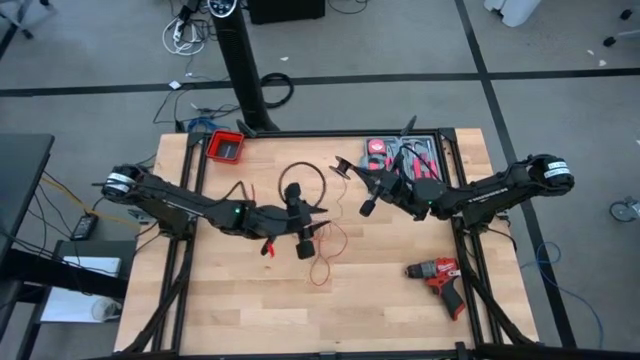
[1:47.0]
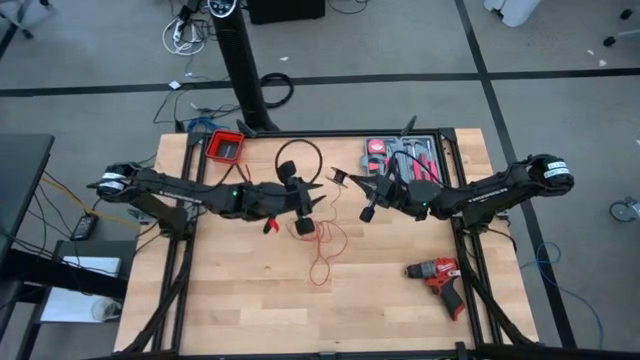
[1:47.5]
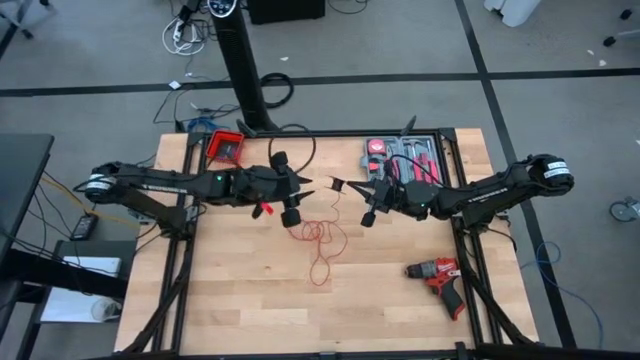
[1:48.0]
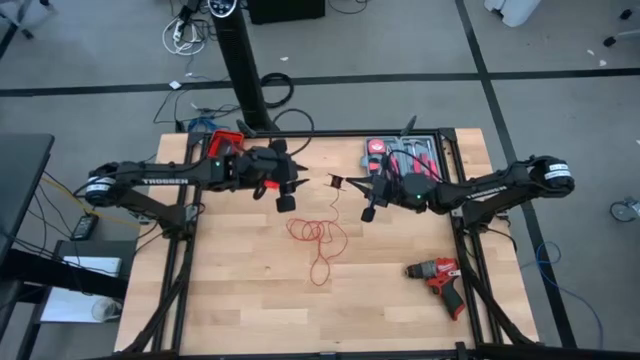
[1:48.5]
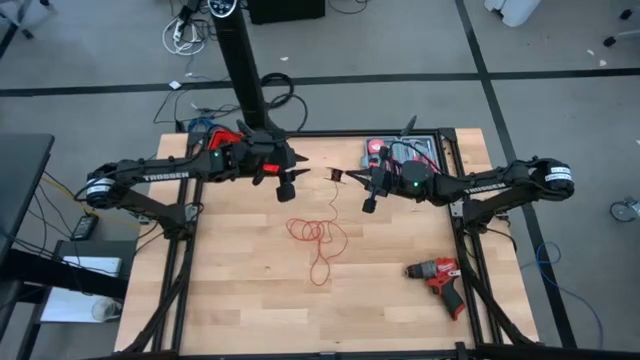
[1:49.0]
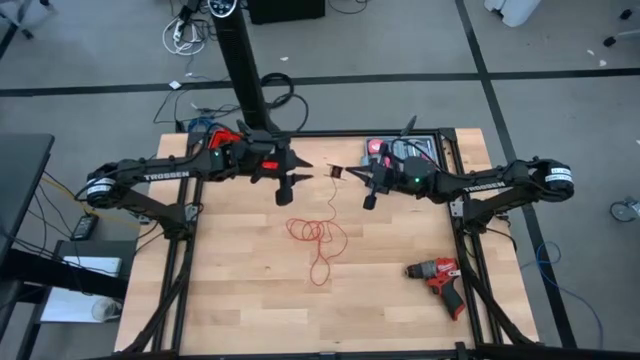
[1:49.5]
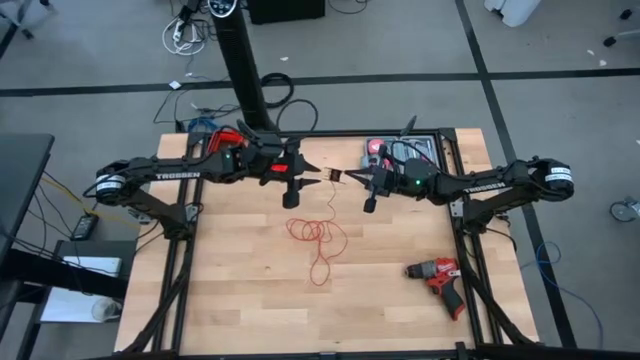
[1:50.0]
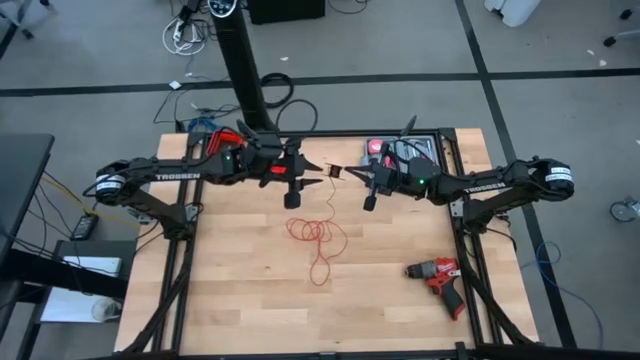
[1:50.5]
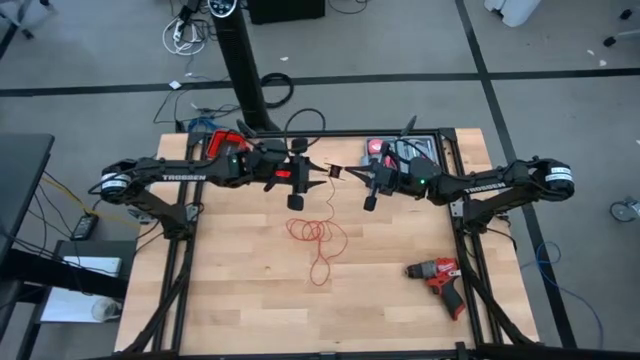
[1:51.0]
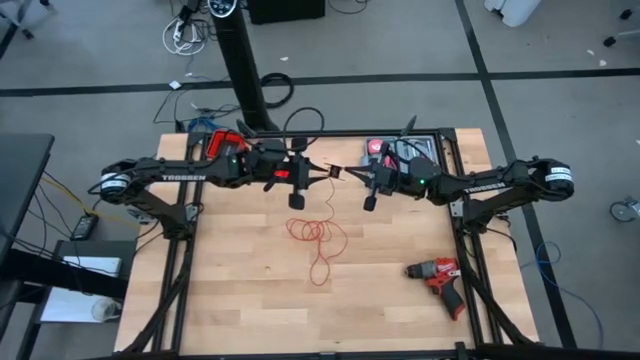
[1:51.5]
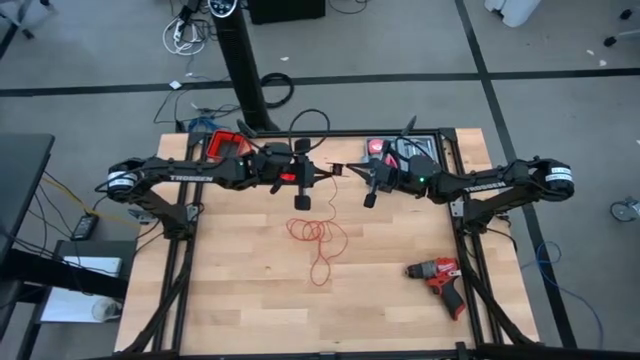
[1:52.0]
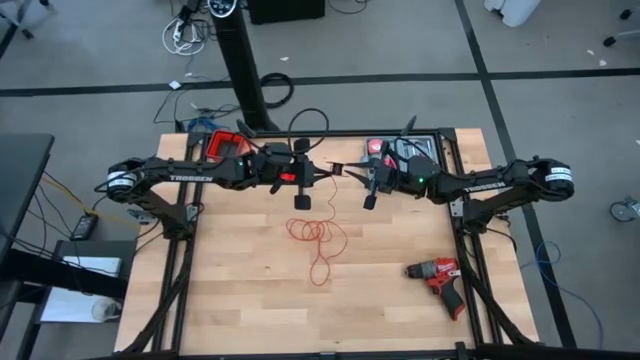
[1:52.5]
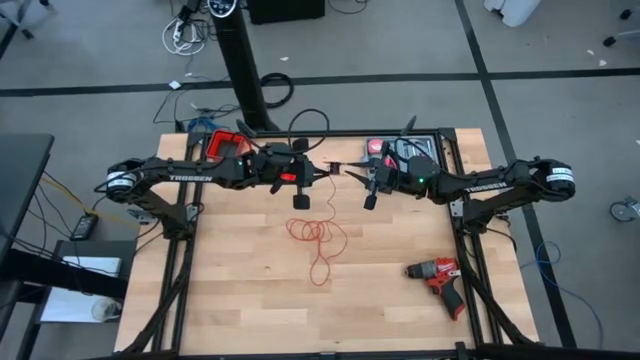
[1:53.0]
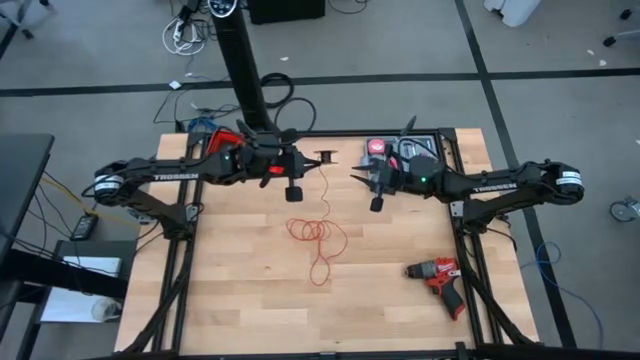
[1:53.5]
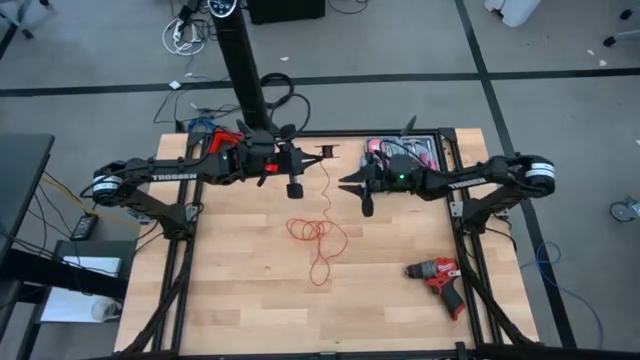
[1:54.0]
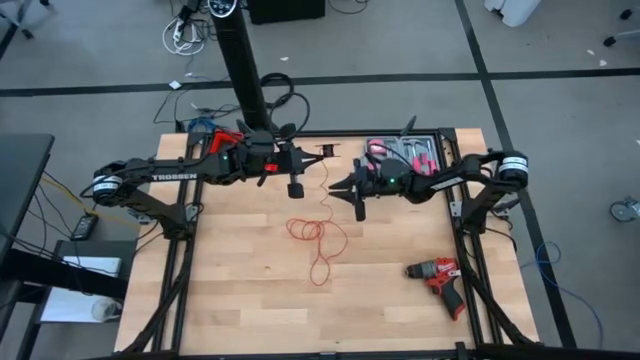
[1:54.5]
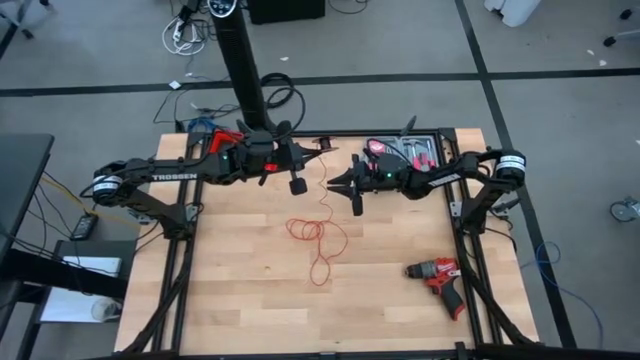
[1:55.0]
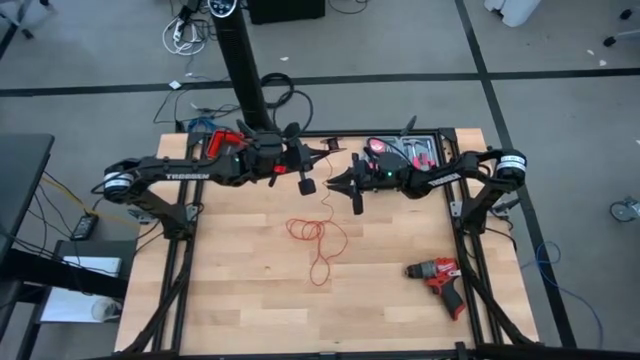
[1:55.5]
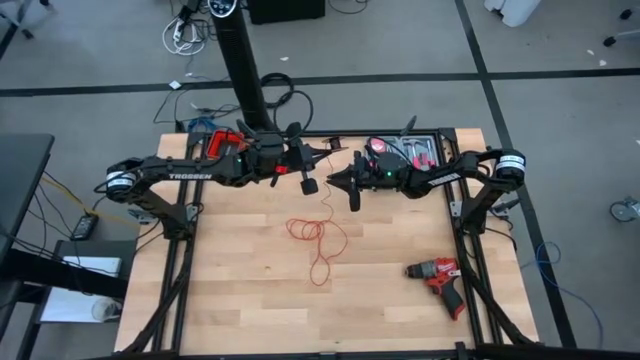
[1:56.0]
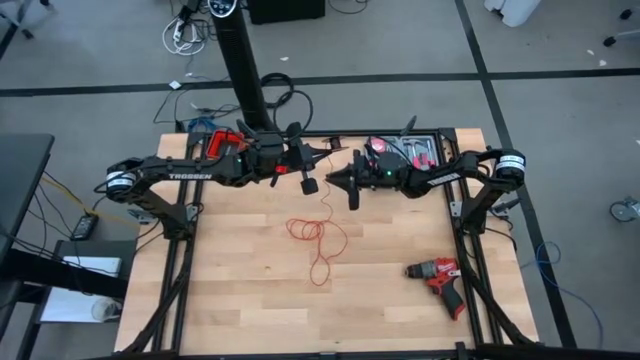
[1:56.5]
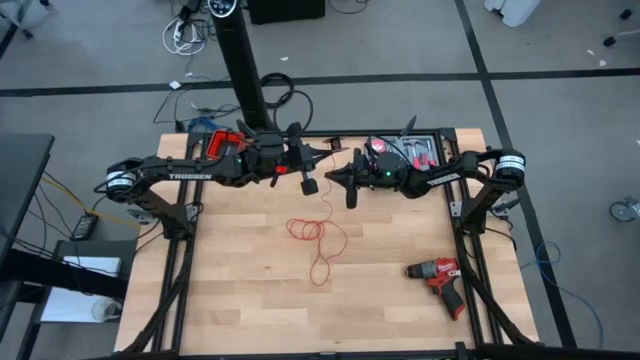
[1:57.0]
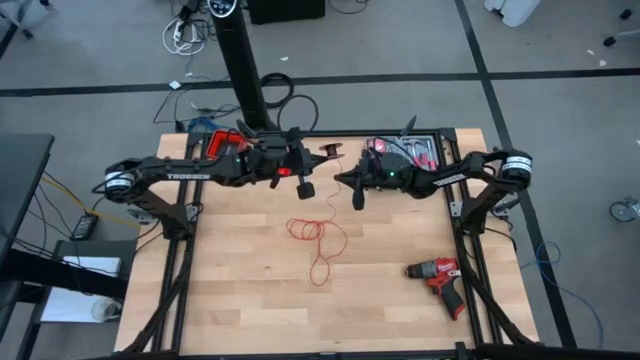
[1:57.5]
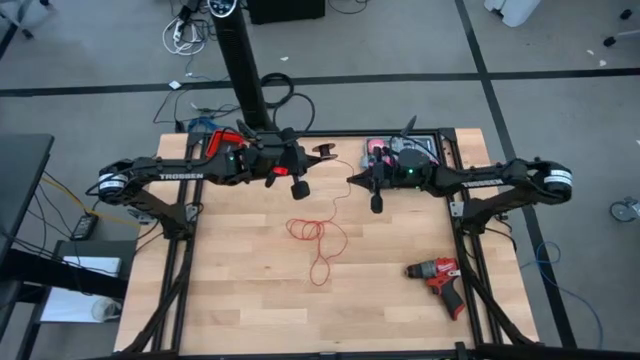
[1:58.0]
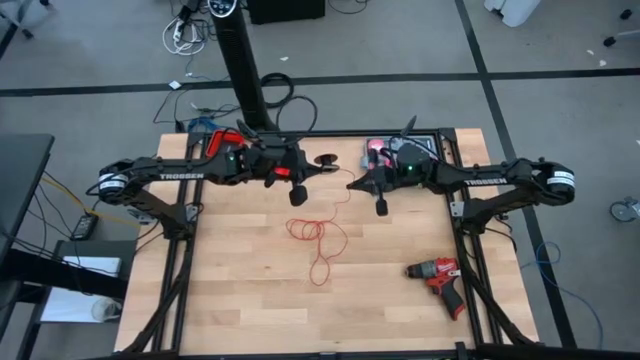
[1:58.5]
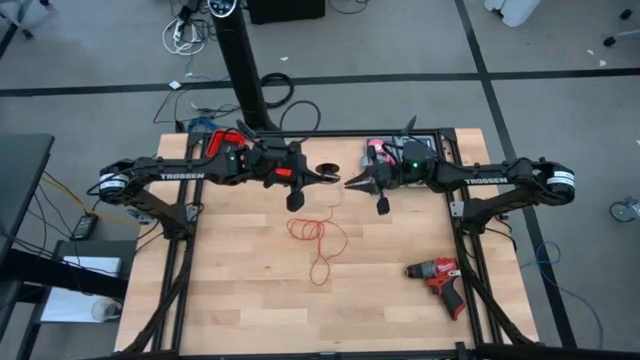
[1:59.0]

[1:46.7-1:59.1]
Task: Coil cords
Coil the red wire onto the black spool

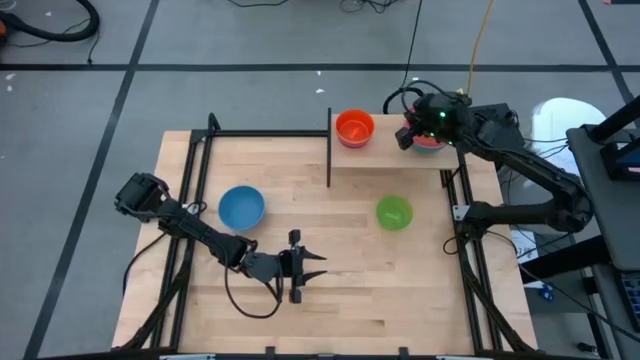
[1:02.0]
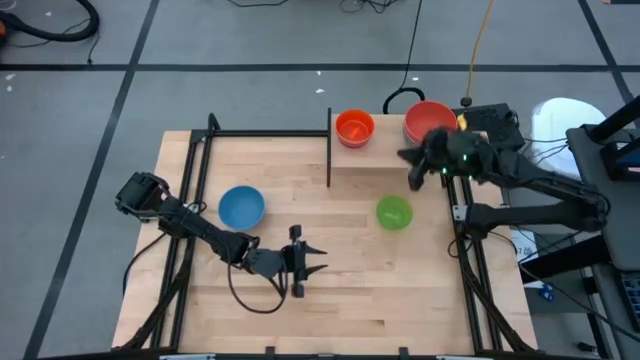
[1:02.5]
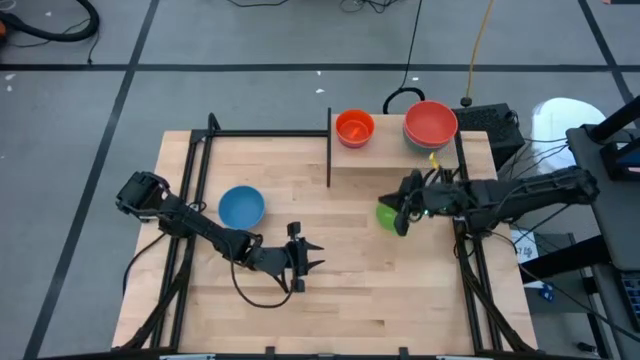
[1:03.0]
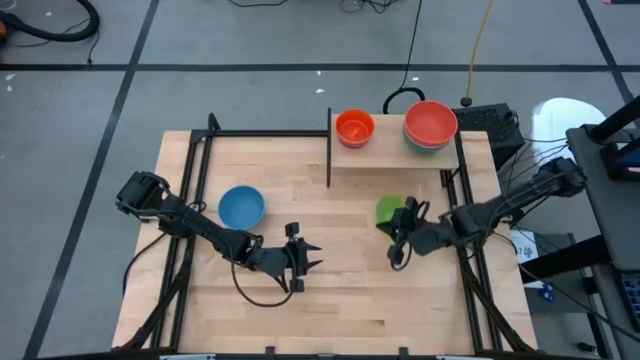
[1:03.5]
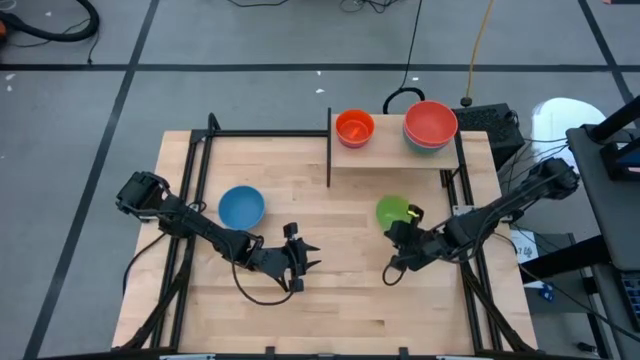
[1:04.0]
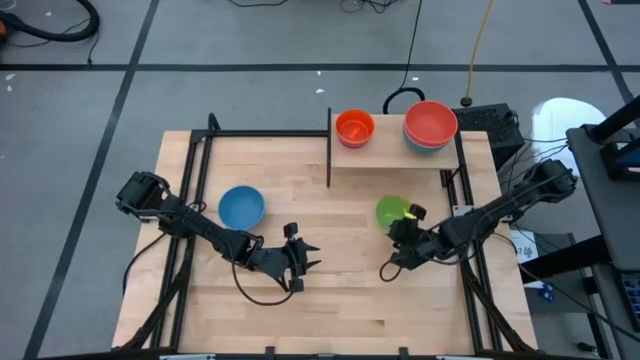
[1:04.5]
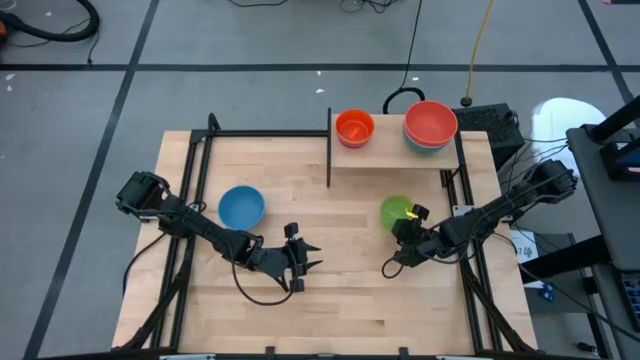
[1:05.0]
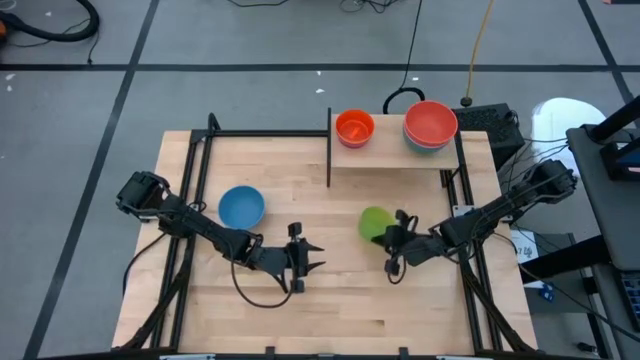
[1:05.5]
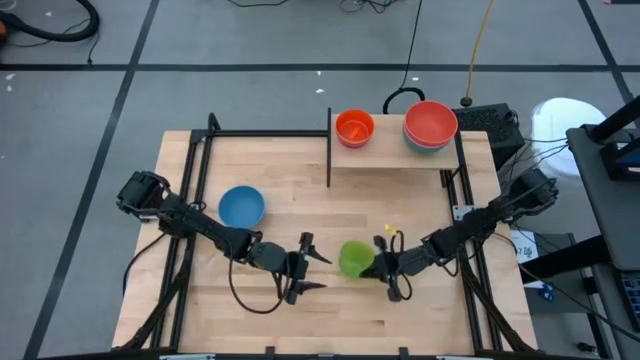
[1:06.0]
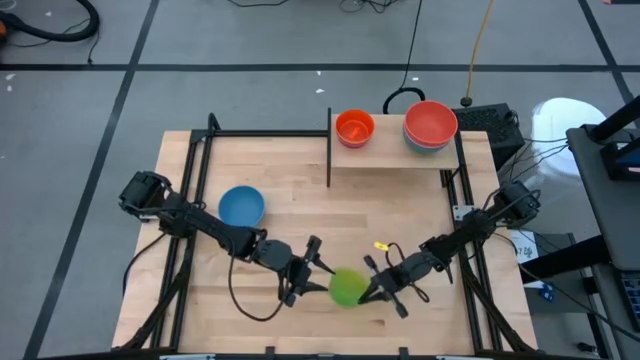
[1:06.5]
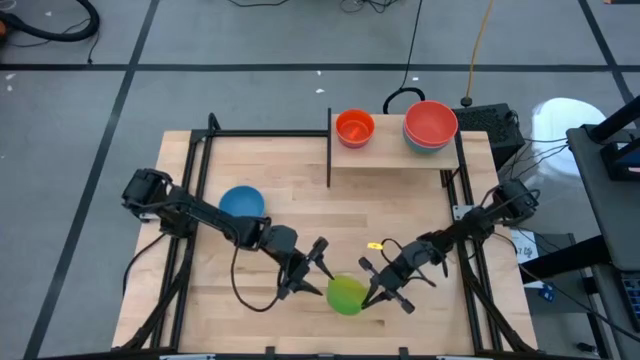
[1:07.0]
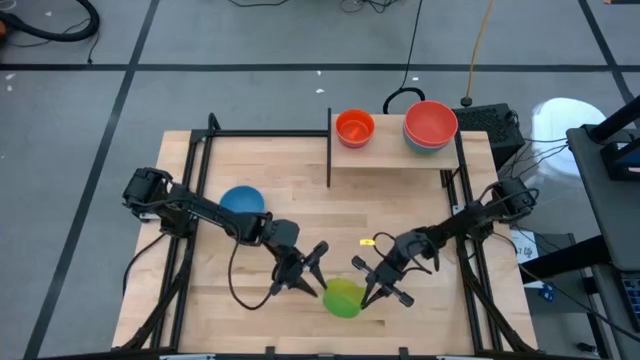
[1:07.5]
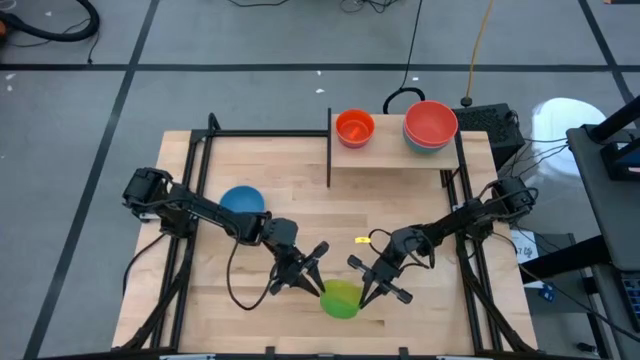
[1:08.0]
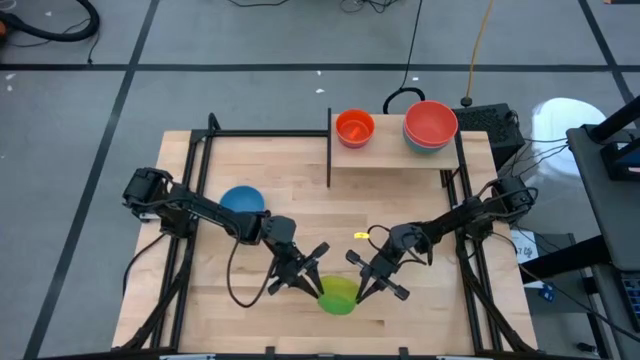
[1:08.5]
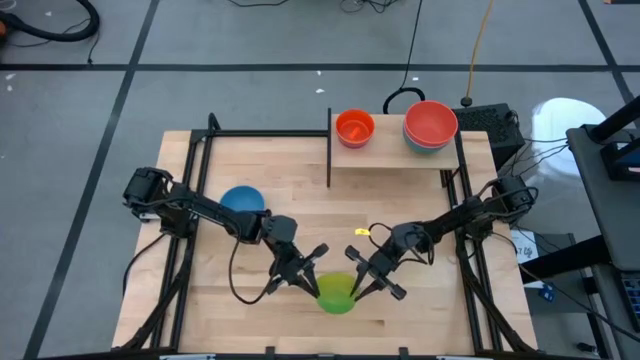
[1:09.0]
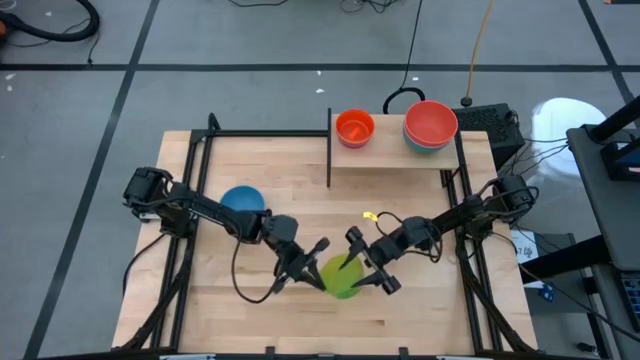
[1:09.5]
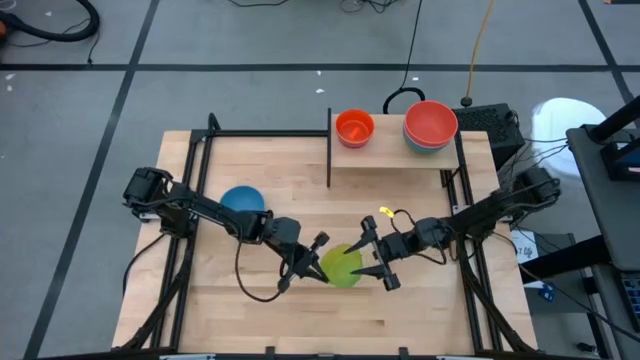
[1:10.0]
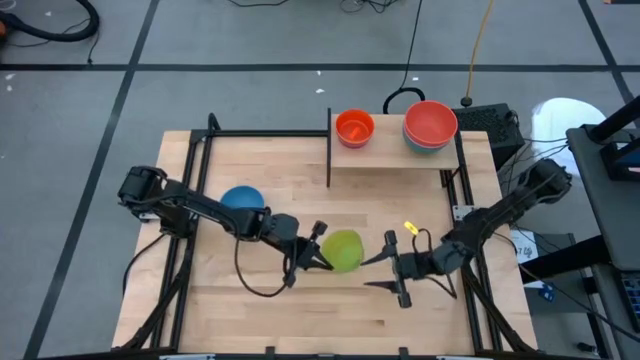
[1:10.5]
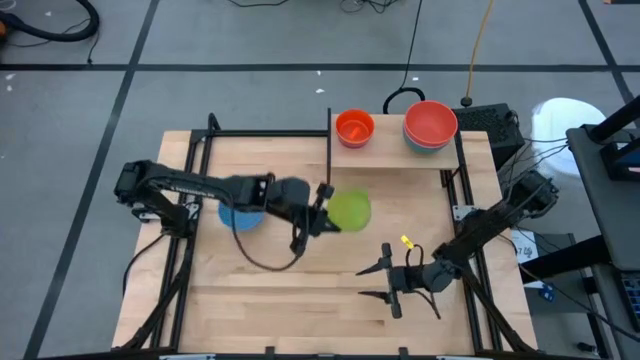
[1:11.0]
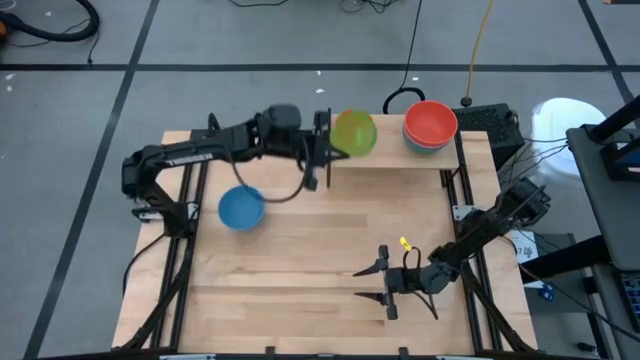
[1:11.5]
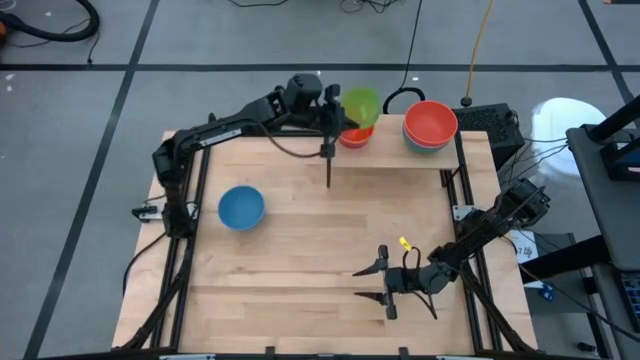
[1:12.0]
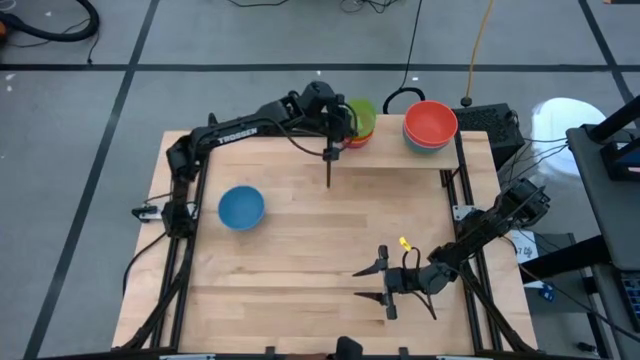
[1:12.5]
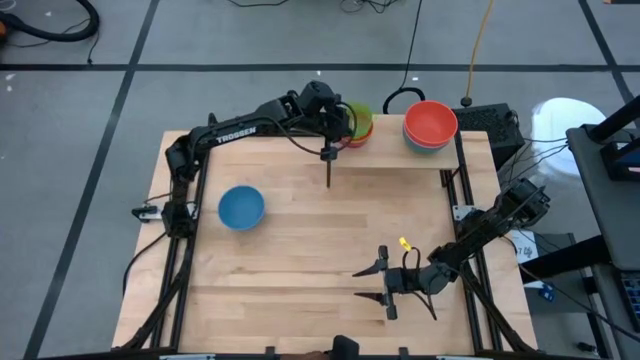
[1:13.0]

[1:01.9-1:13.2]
Task: Place and stack bowls onto a shelf
Stack the small green bowl on top of the small orange bowl on the shelf
